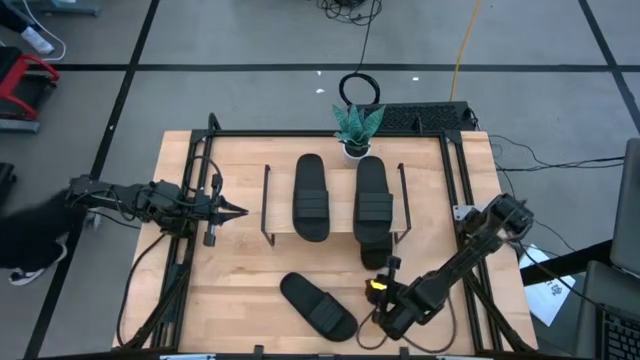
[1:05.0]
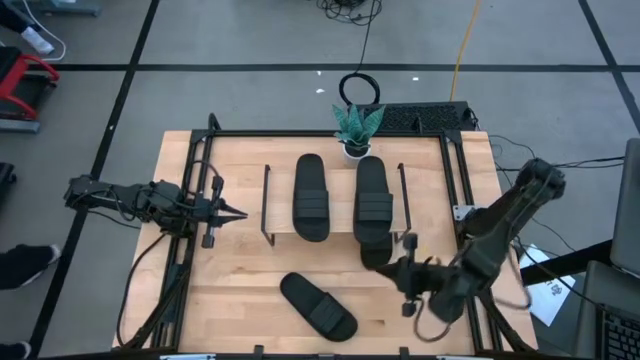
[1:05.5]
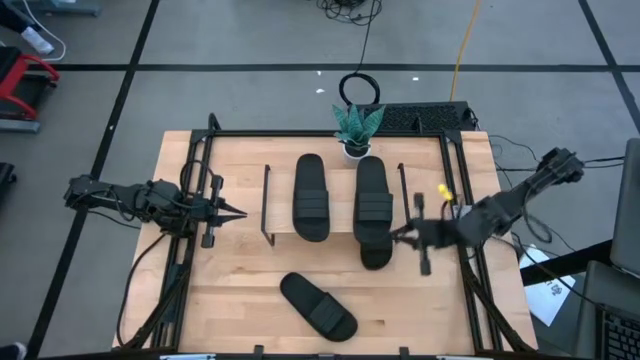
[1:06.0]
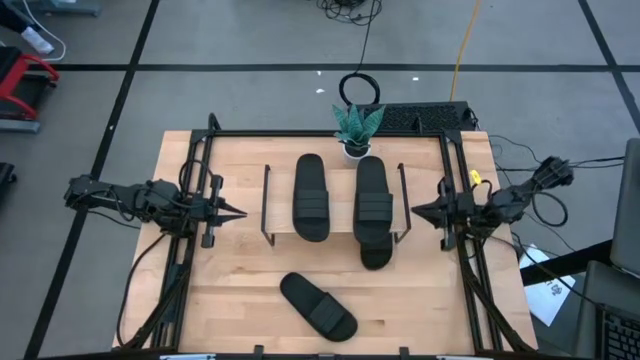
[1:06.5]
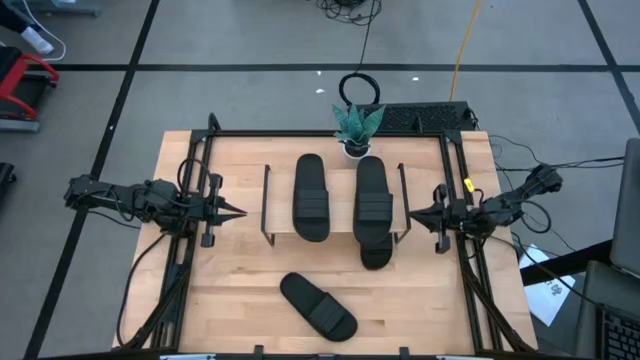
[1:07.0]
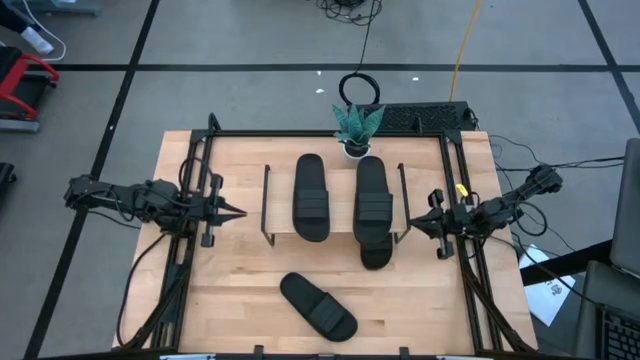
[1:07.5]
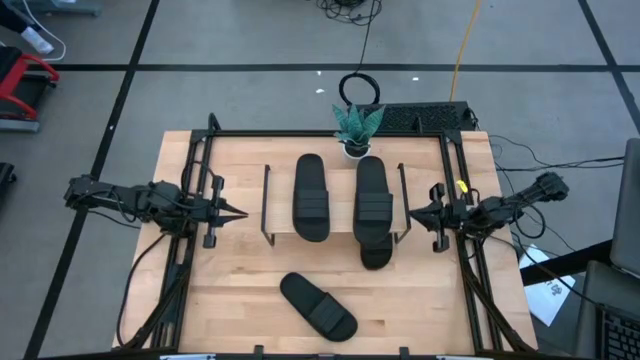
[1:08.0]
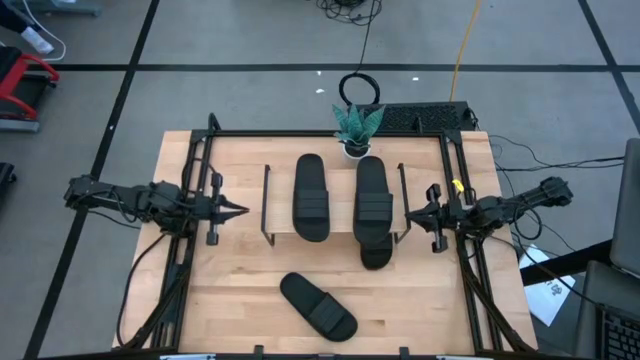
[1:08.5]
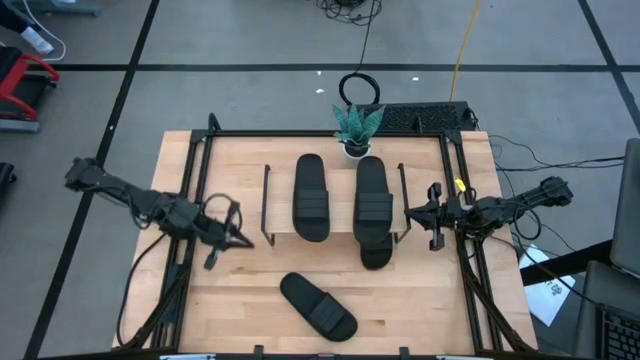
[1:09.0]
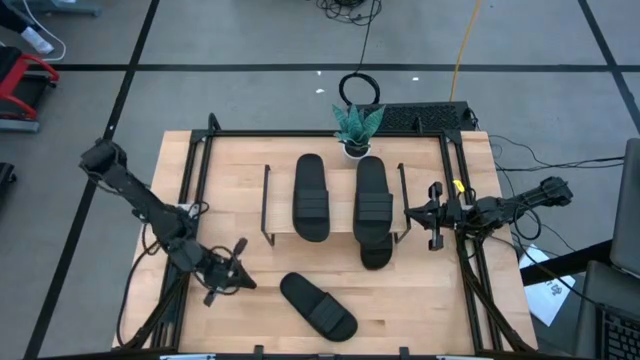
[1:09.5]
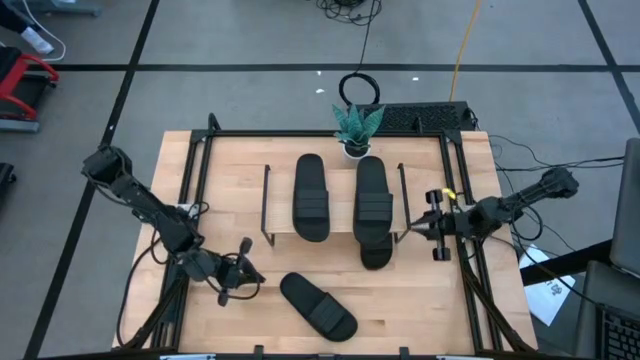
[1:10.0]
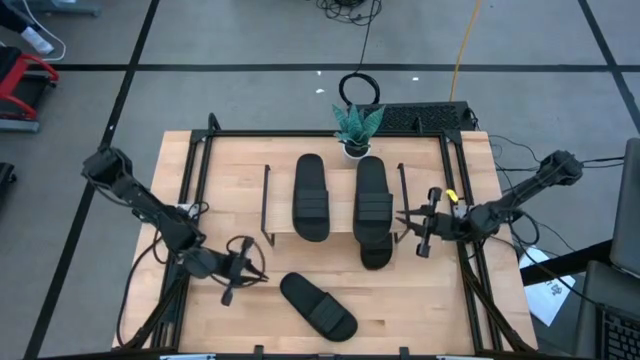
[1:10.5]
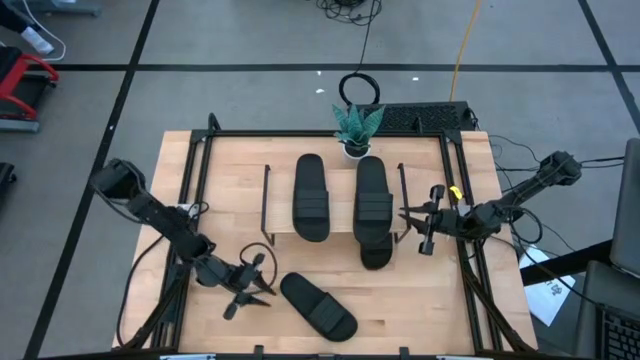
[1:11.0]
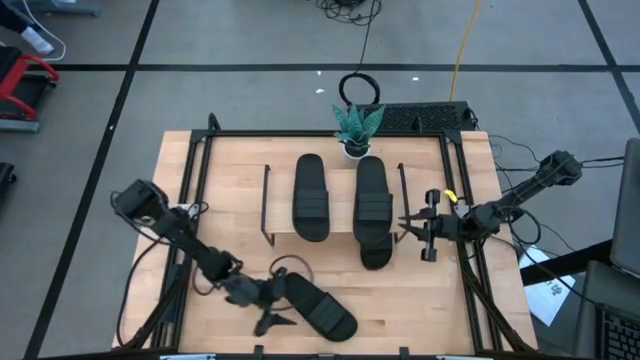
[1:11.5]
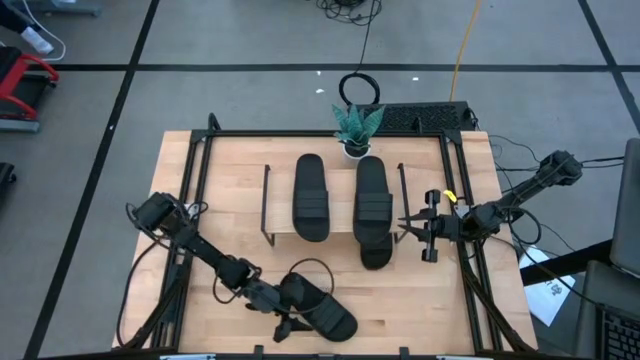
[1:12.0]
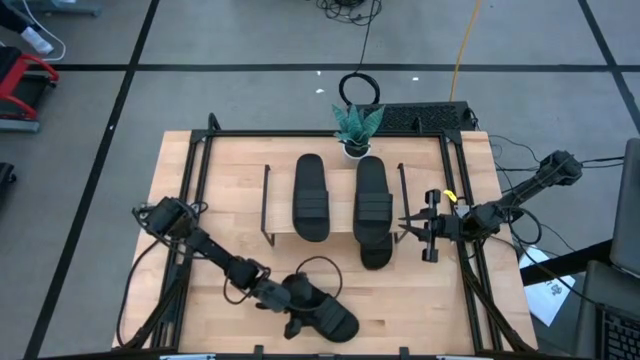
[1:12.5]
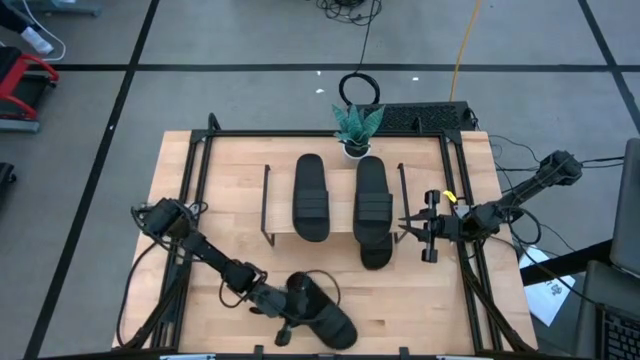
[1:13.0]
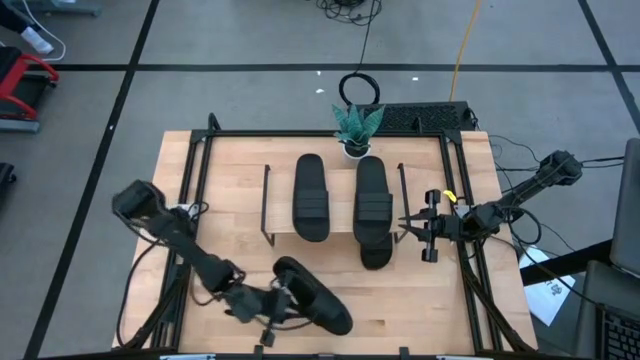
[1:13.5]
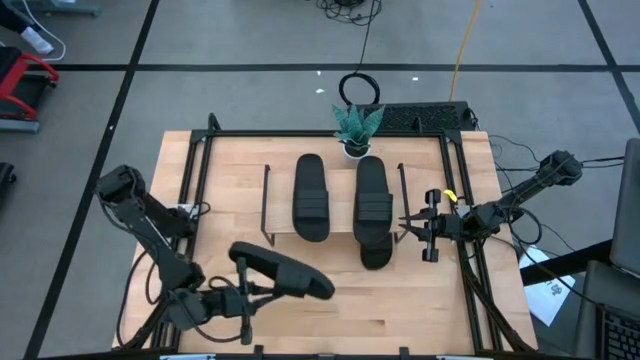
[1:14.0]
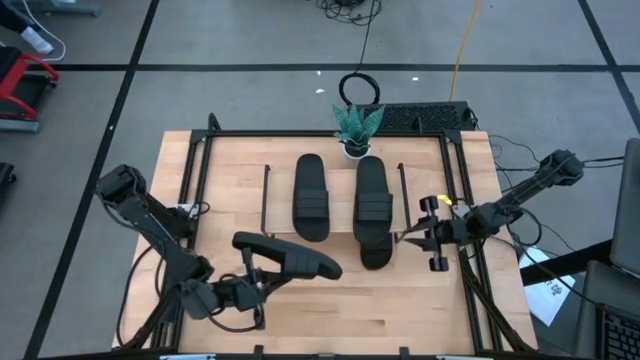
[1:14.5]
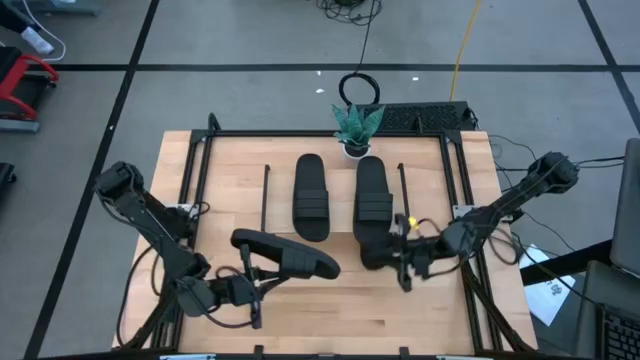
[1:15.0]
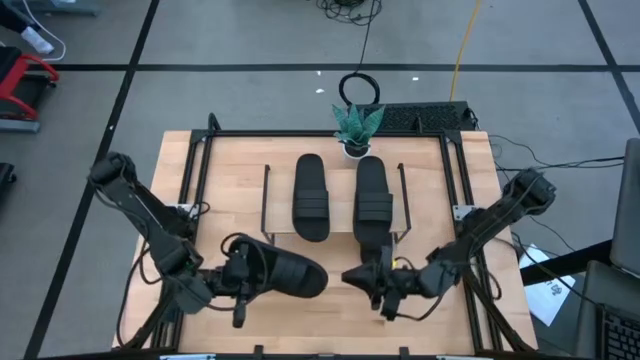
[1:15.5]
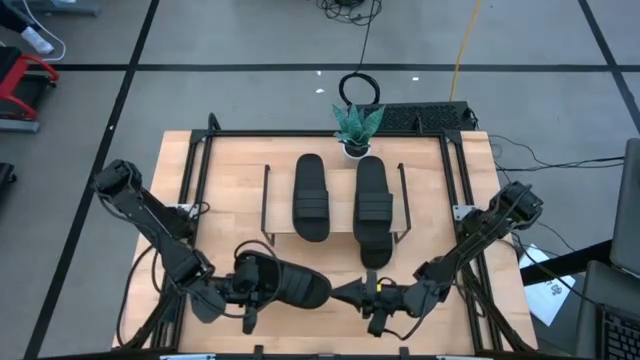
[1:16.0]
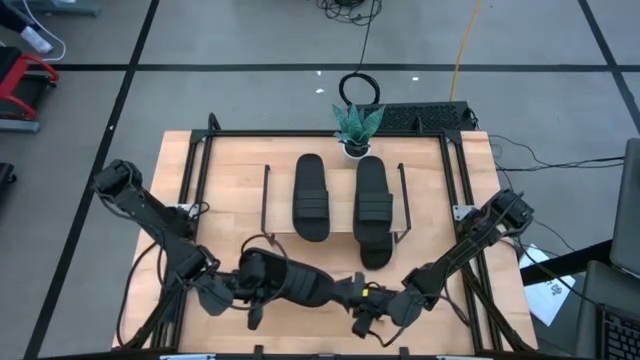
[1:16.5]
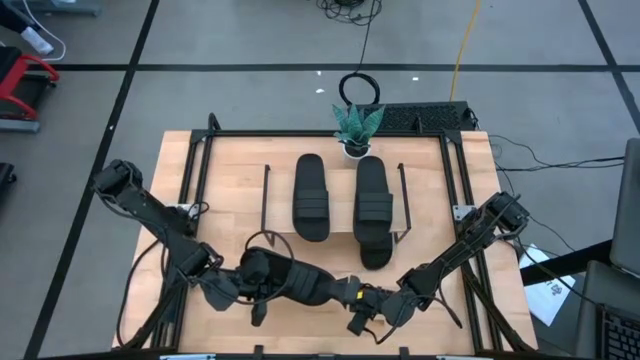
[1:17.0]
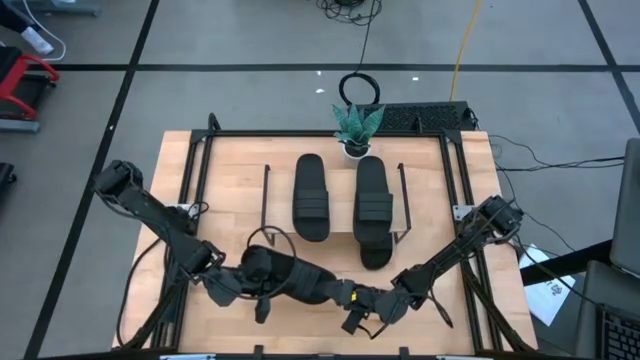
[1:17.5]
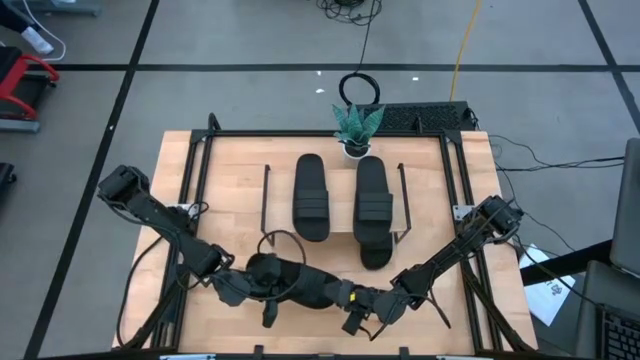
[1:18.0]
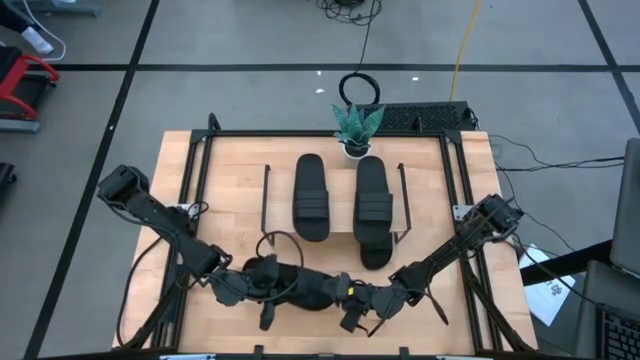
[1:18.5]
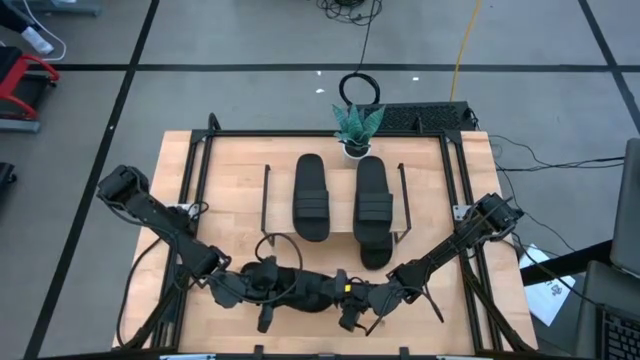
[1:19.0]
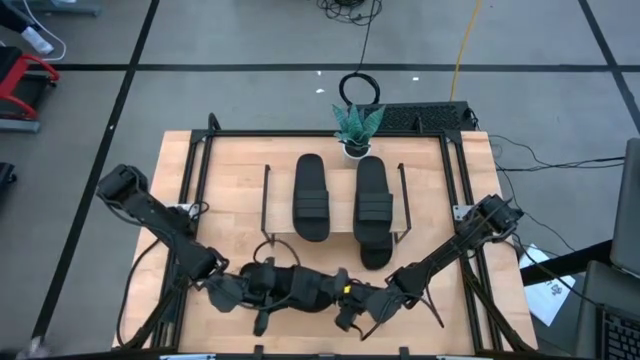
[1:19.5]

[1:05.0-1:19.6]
Task: Pick and place slides into the shelf
Put the black slide under the shelf

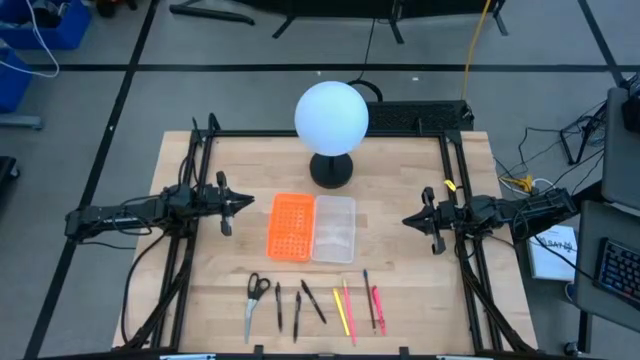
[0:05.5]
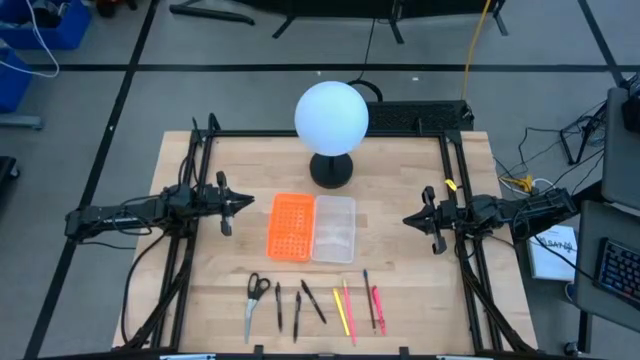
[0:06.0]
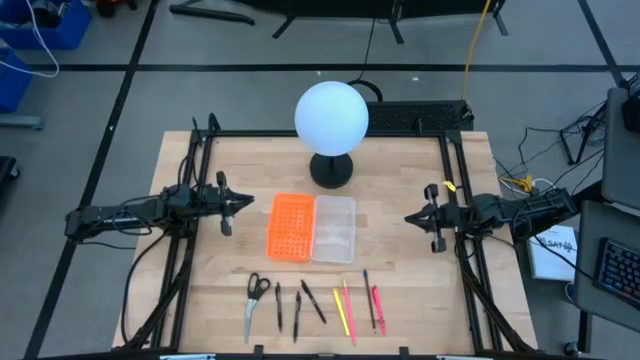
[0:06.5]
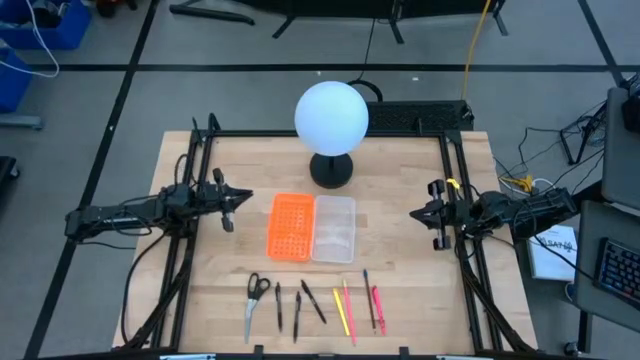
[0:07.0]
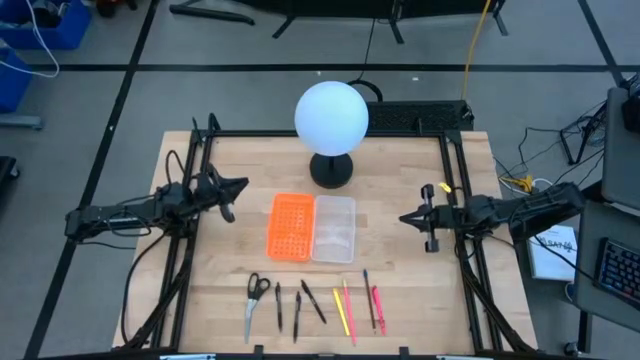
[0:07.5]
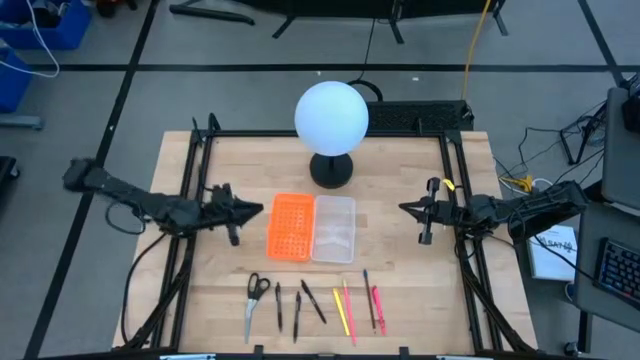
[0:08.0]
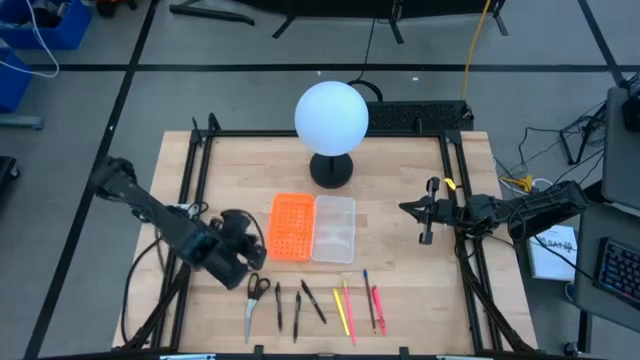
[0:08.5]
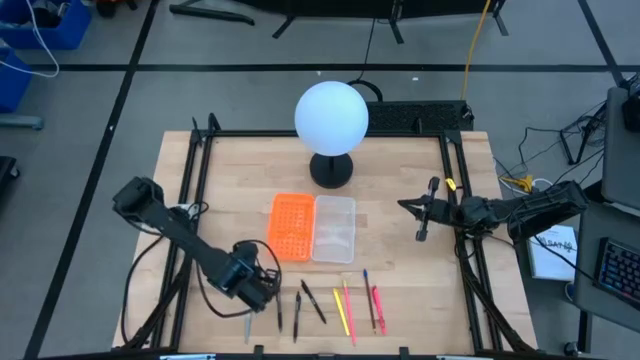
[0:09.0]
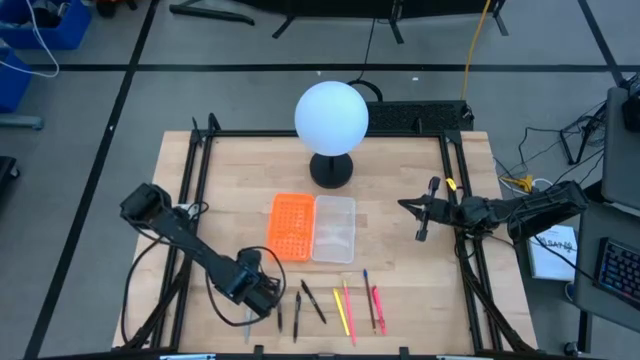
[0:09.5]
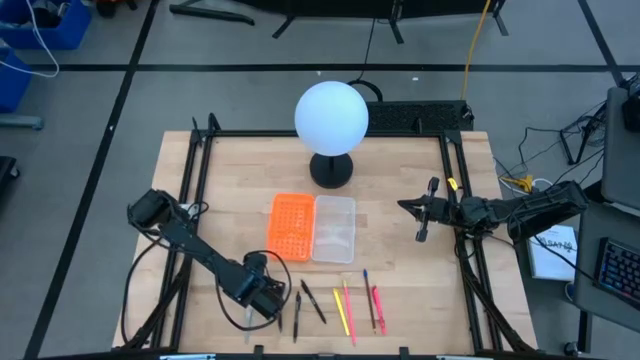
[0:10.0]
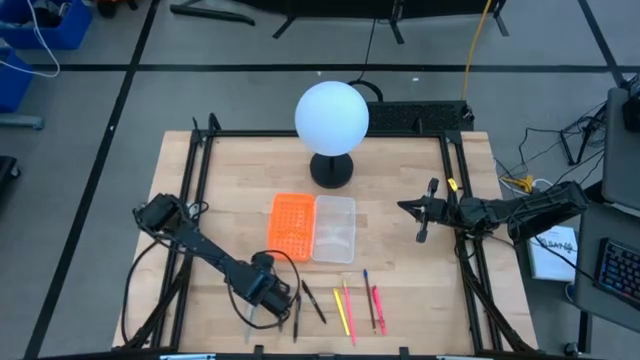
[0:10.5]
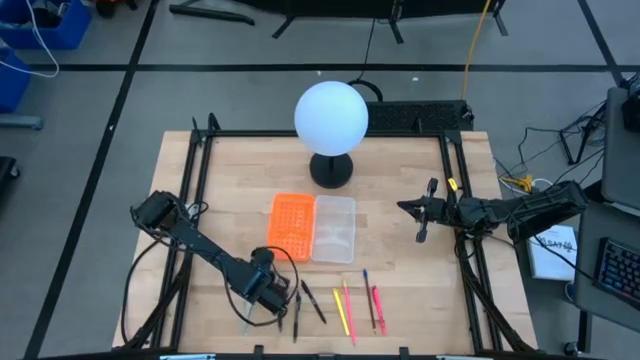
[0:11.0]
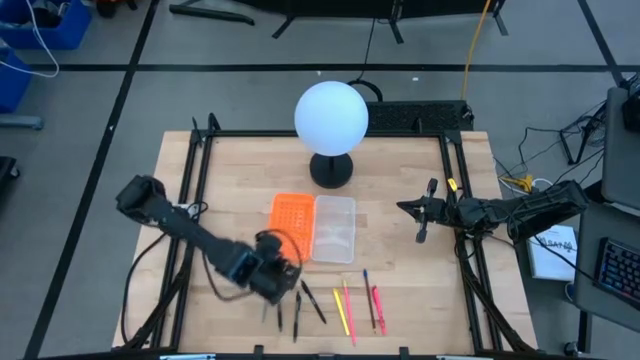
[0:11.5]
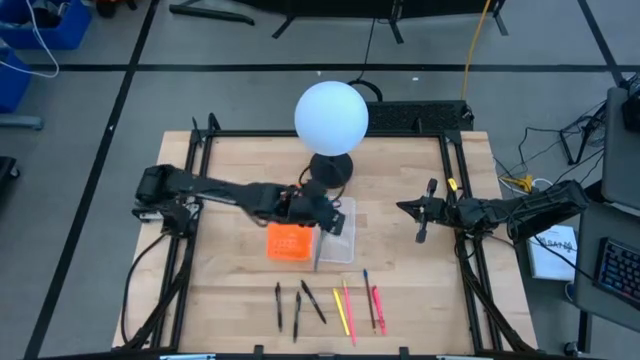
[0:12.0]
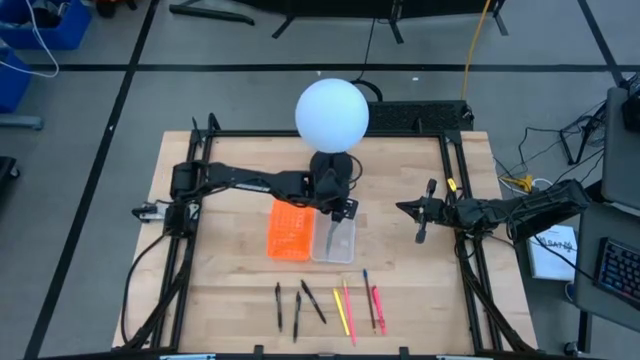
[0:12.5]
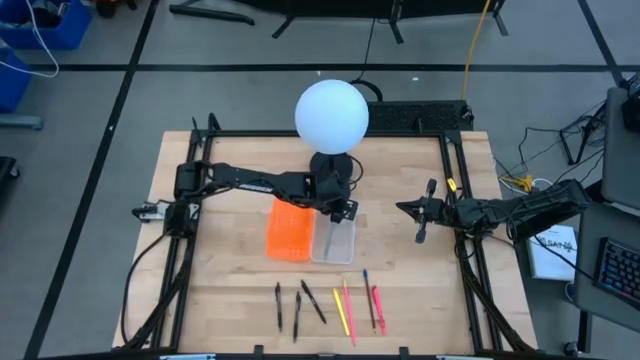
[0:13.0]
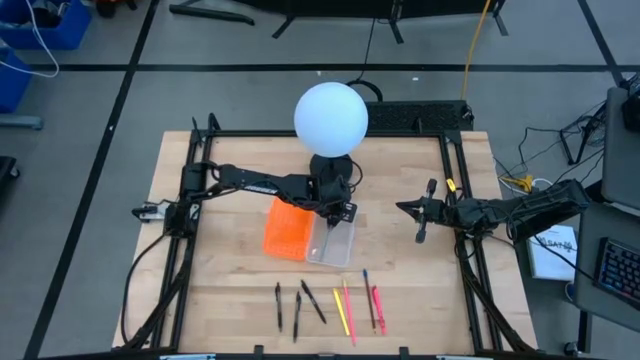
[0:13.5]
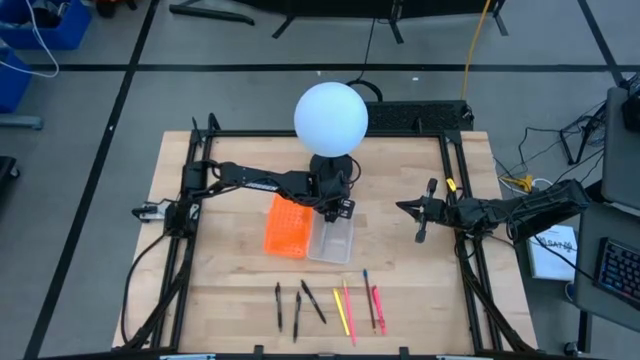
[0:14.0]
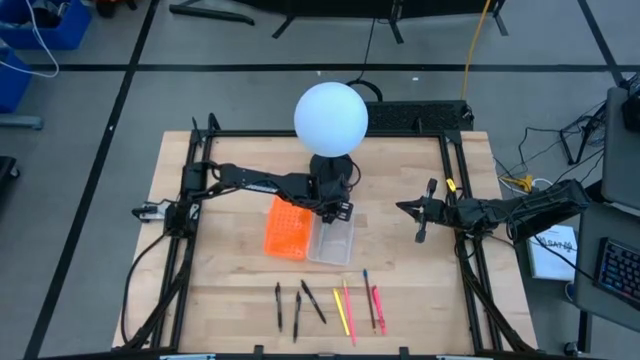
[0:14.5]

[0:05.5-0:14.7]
Task: Pick & place school supplies into a supply box
Put the black scissor into the supply box
